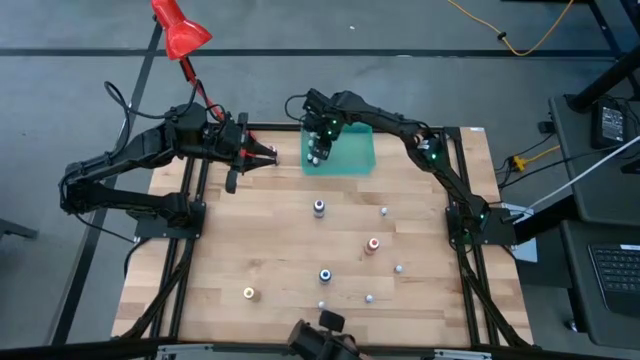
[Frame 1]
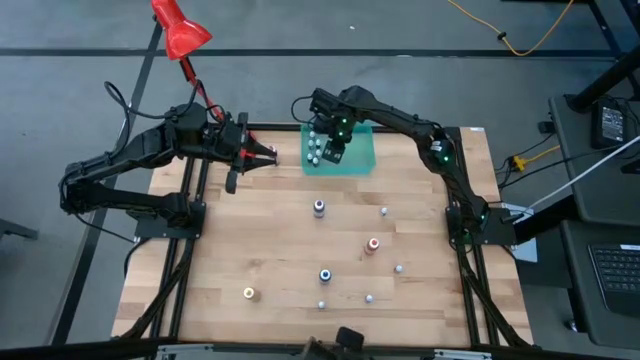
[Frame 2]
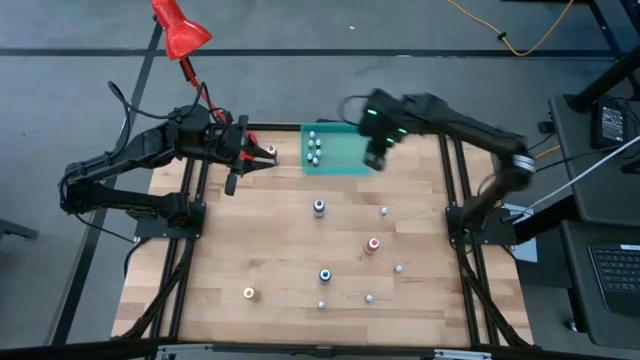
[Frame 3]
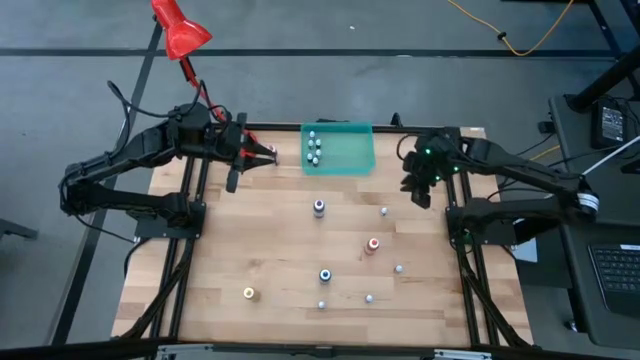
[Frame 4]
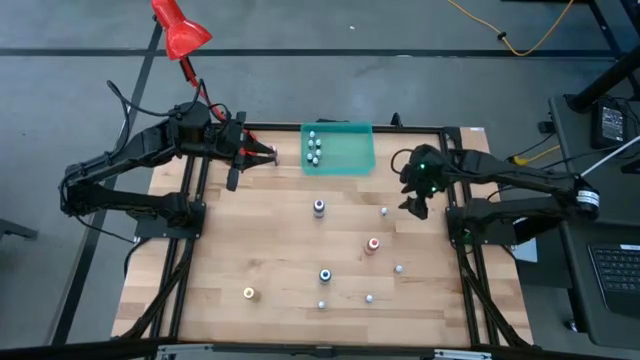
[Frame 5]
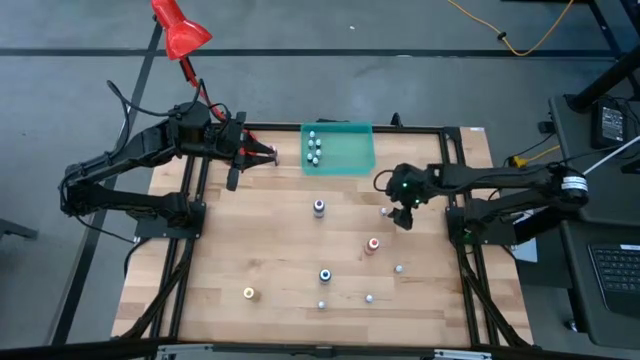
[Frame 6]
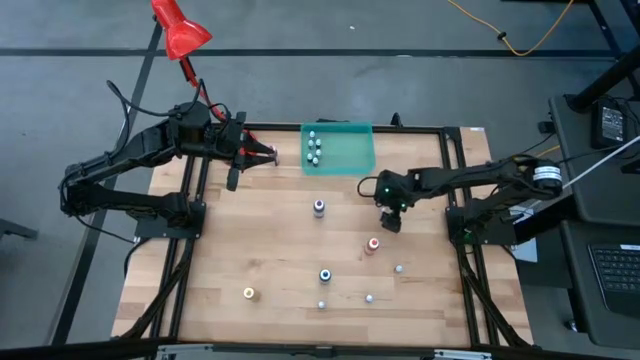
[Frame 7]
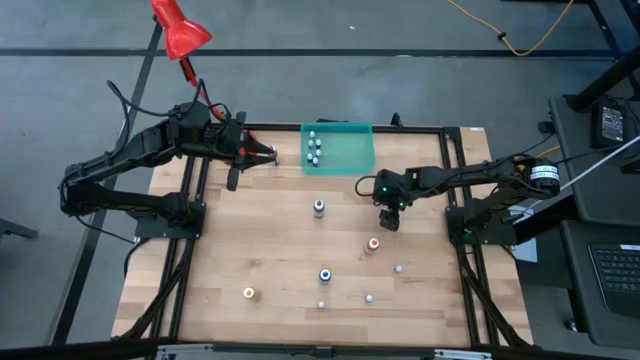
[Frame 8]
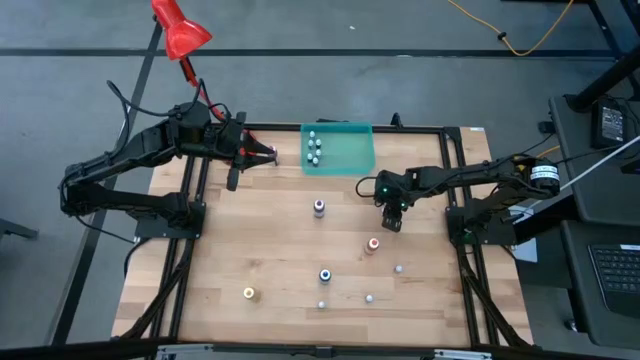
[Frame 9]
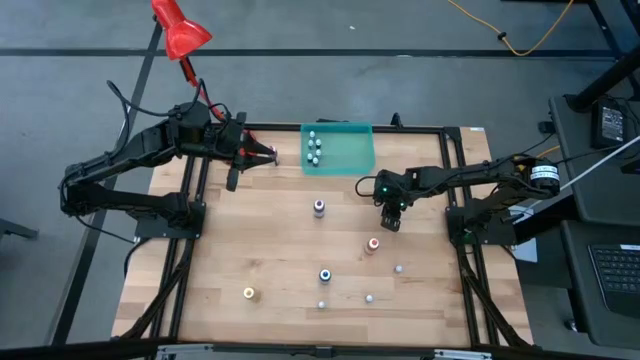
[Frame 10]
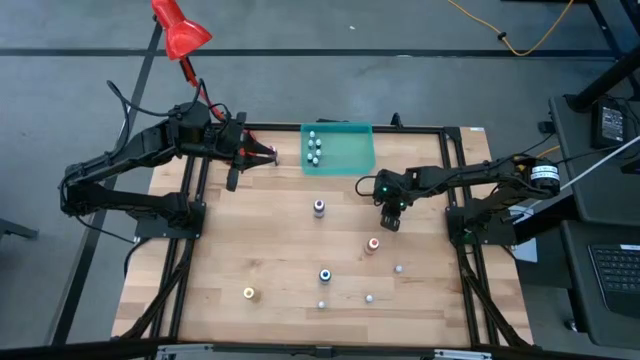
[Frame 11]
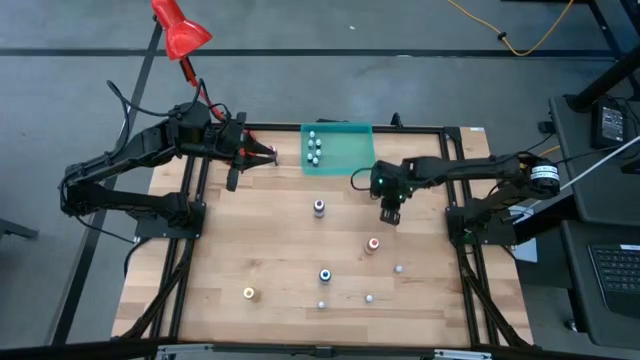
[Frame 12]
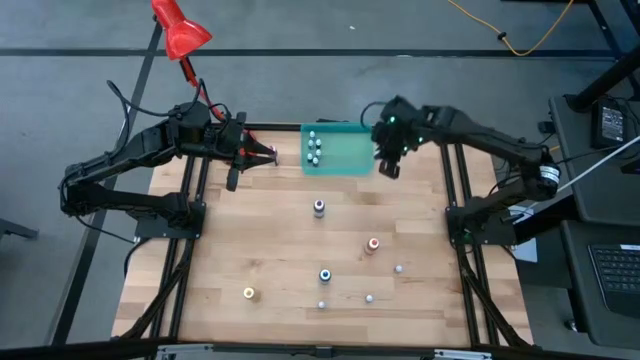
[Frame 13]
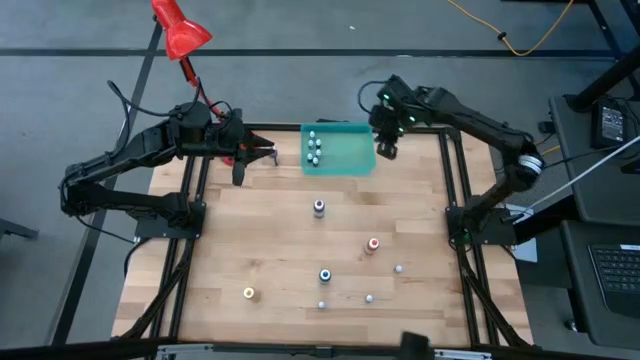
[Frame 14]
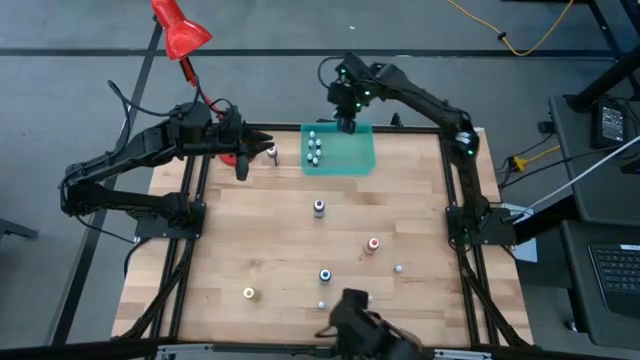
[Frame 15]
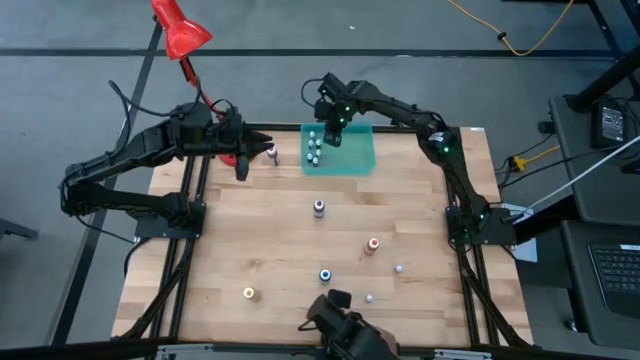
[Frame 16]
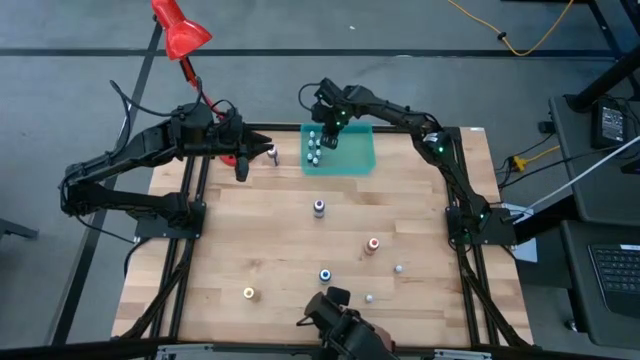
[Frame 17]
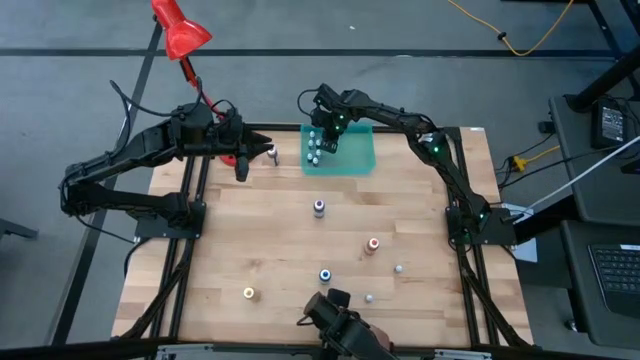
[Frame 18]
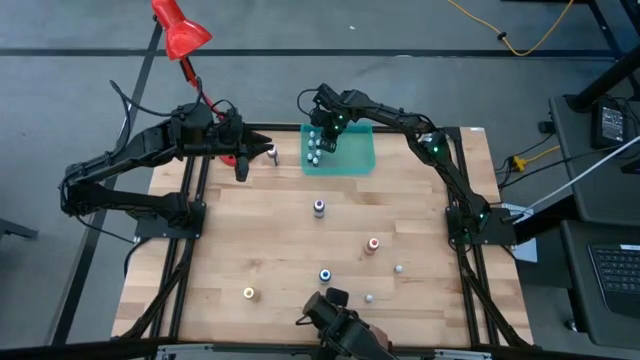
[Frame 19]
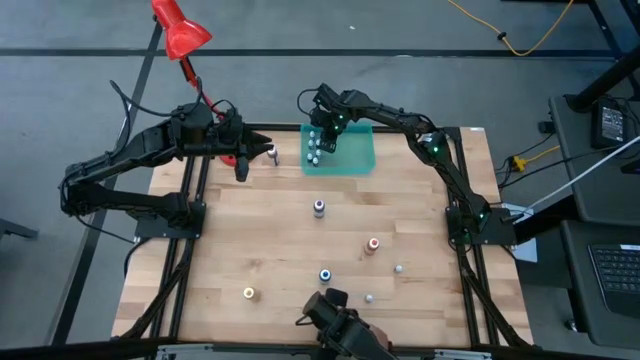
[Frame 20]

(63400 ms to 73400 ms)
Task: Pick & Place food coloring
Put the small pink food coloring bottle into the green bin

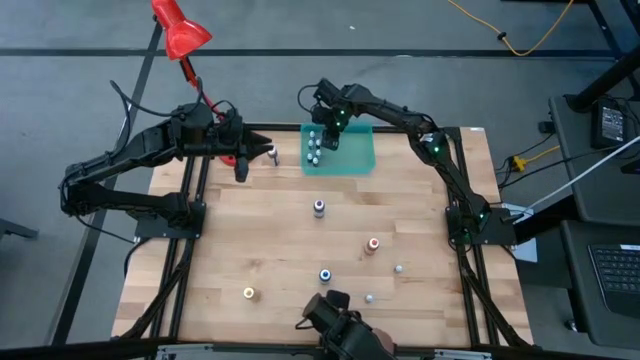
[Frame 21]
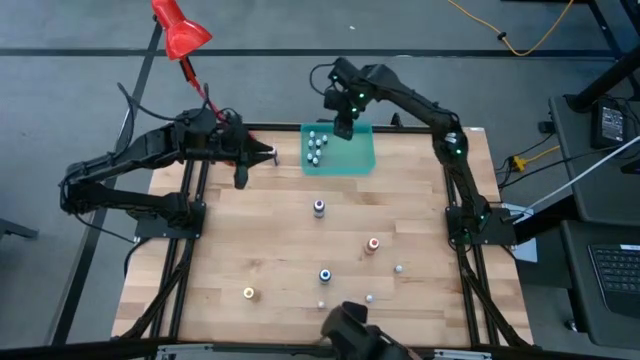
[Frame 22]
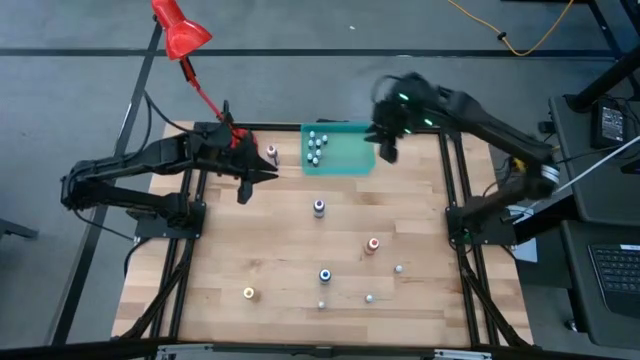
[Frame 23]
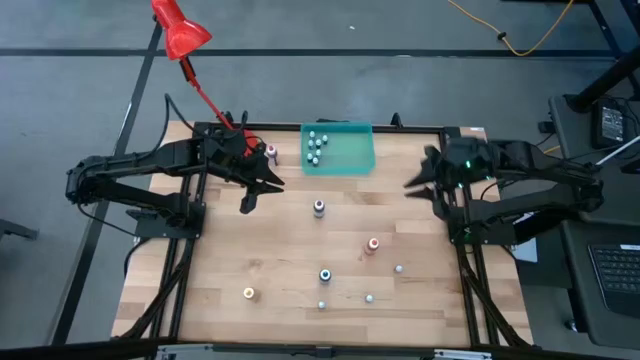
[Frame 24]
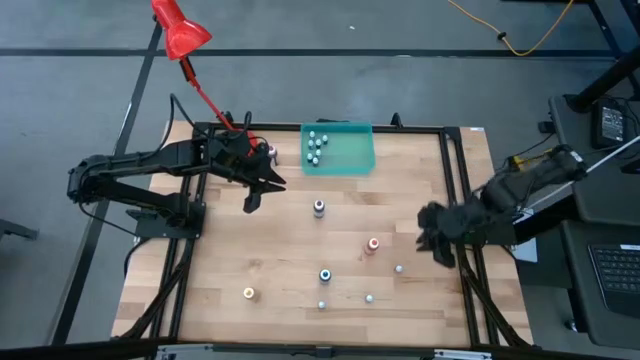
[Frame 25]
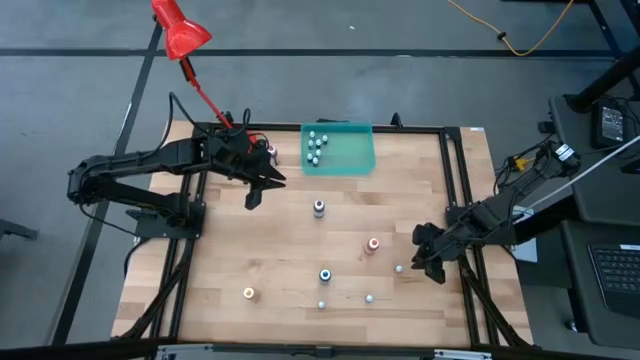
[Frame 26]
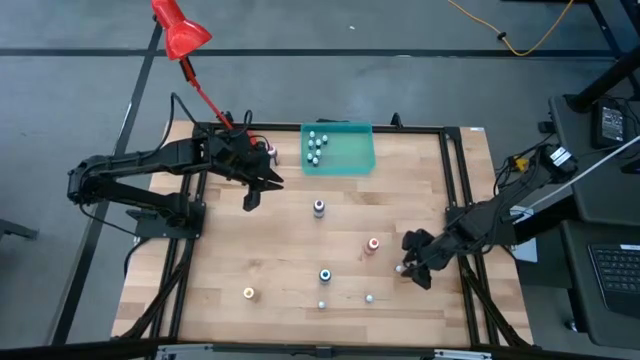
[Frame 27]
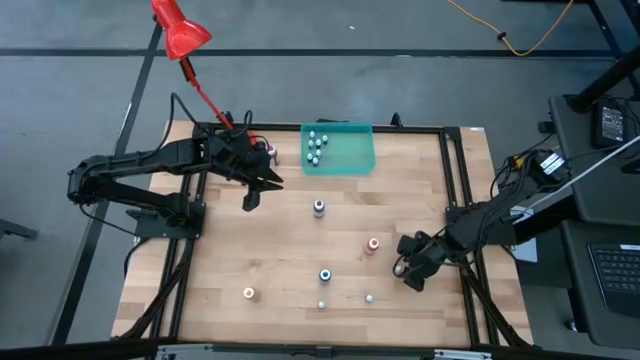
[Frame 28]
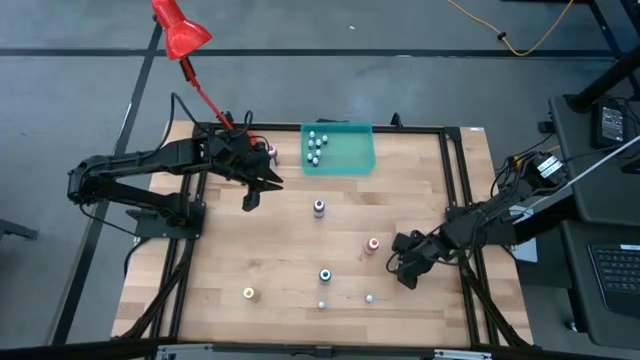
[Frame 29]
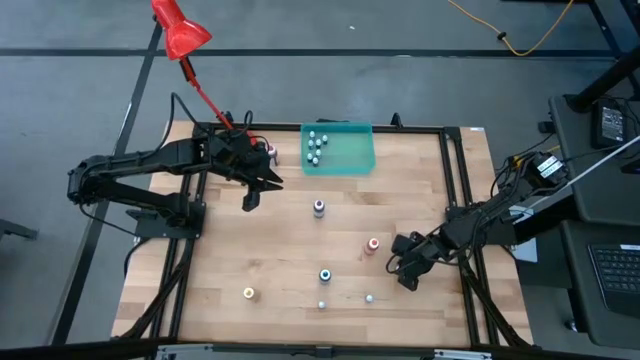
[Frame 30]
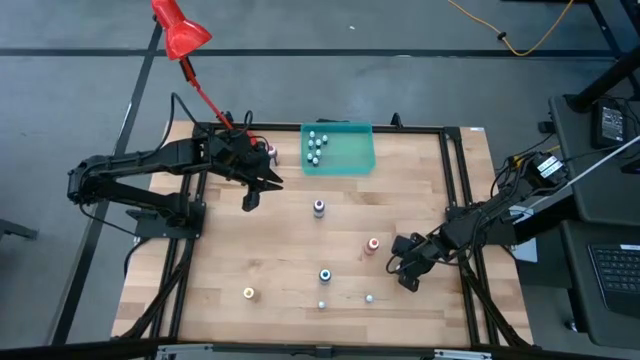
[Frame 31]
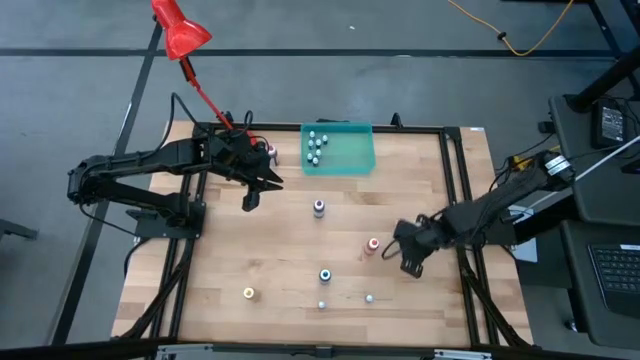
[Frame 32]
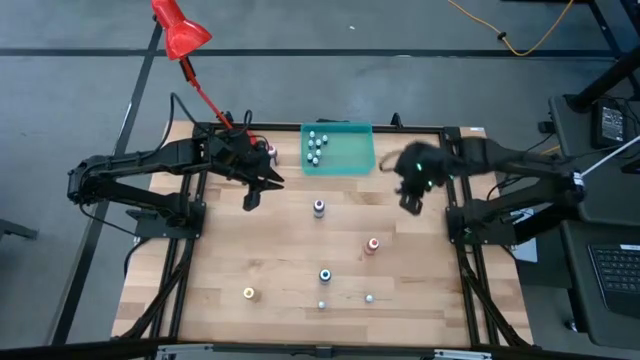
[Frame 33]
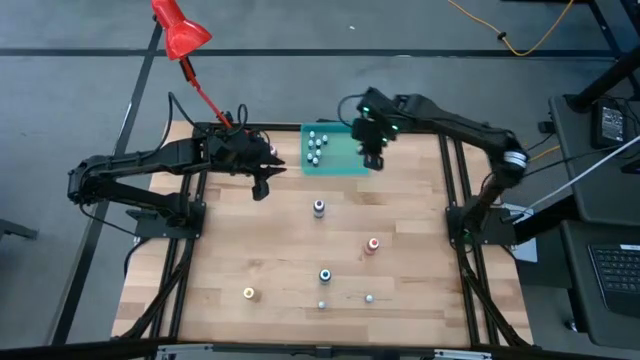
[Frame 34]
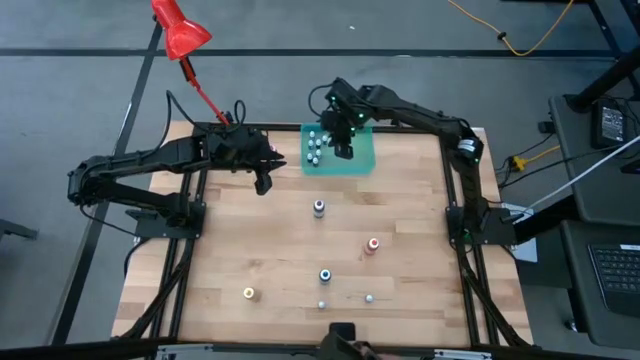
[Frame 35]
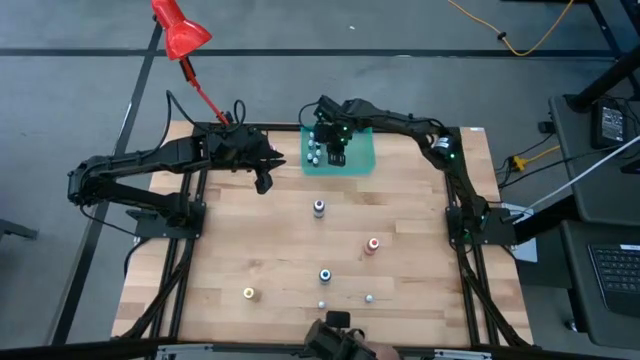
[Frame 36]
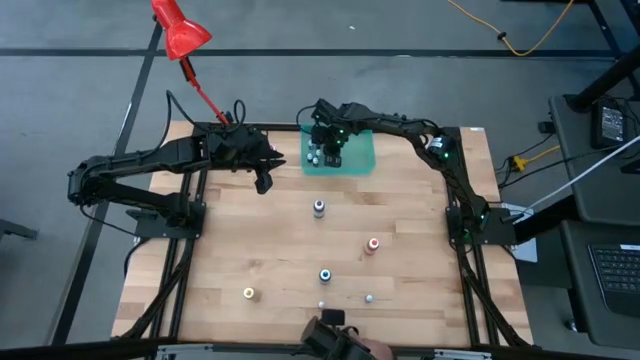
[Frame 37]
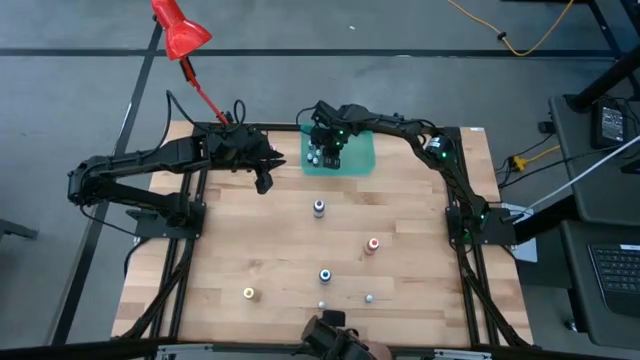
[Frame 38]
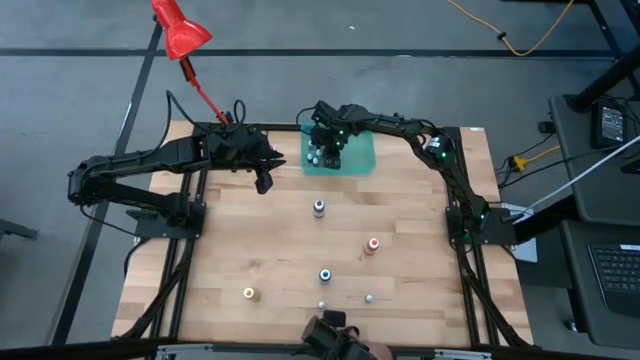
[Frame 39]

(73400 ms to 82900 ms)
Put the small red food coloring bottle into the green bin

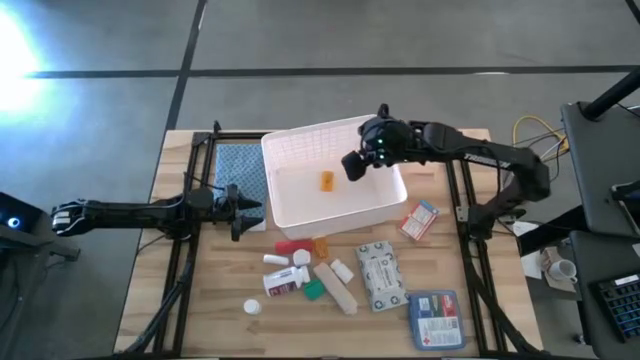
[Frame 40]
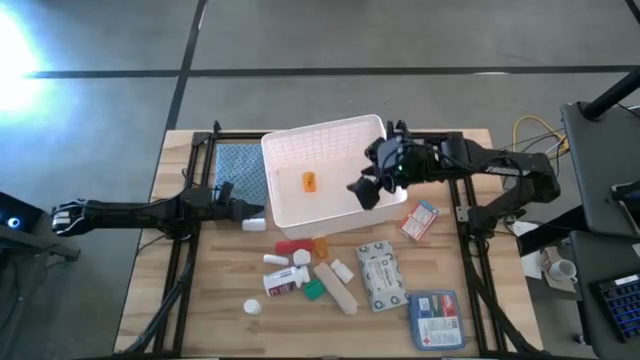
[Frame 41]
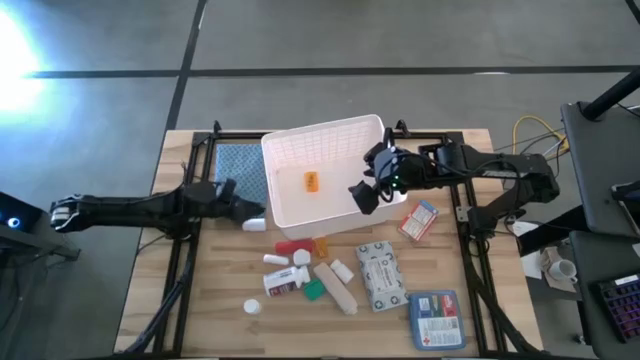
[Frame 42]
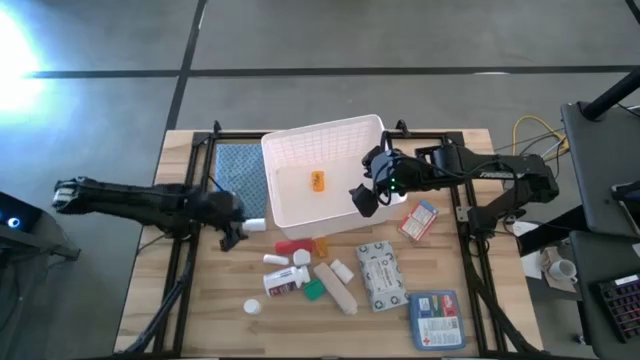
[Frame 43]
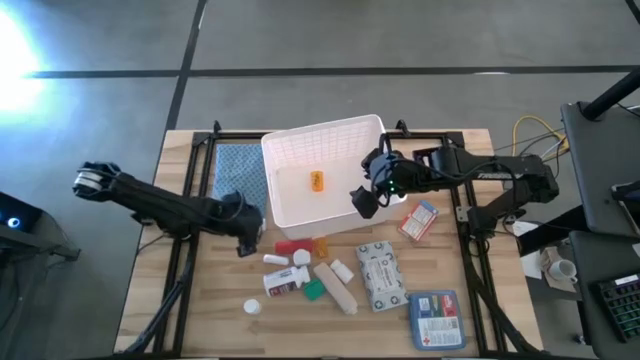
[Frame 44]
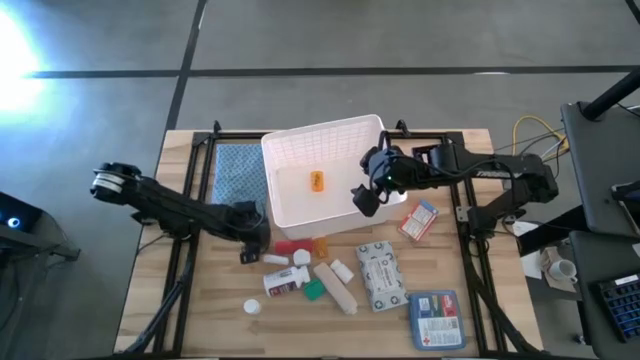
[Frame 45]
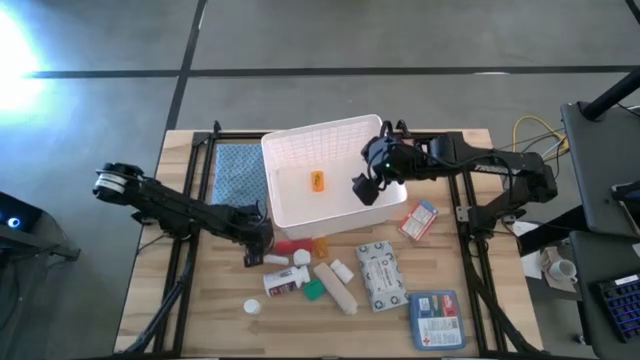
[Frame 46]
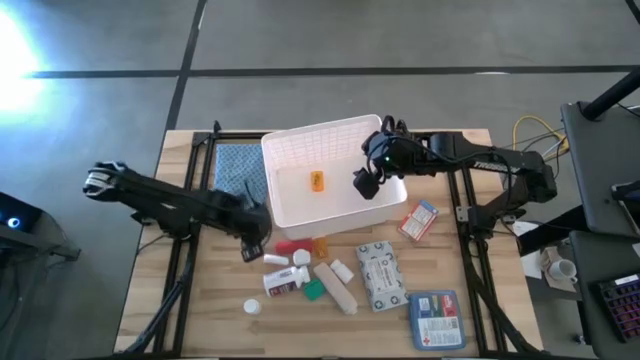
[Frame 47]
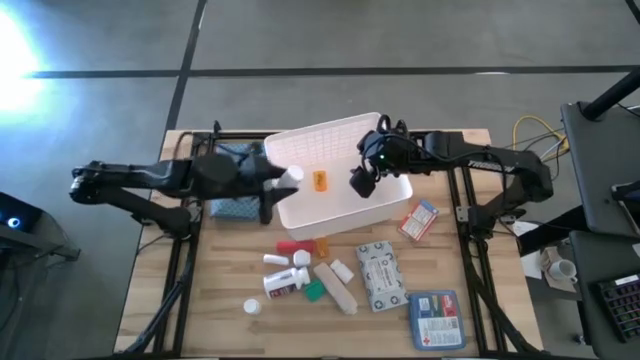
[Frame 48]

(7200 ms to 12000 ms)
Task: Pick & place medical supplies in basket/bin
Put the white pill bottle into the white bin
